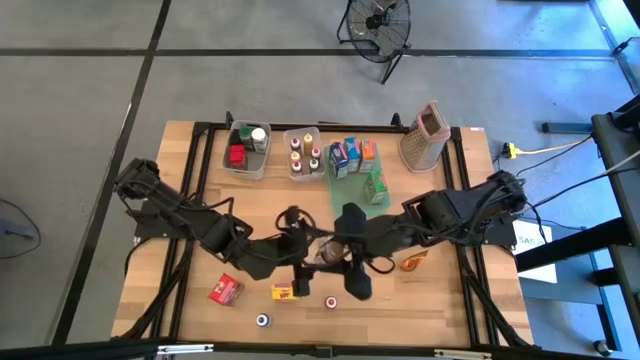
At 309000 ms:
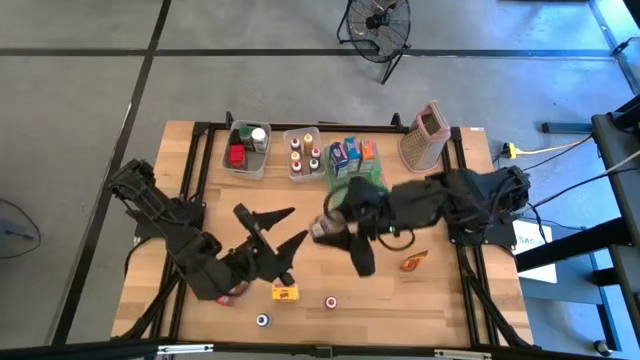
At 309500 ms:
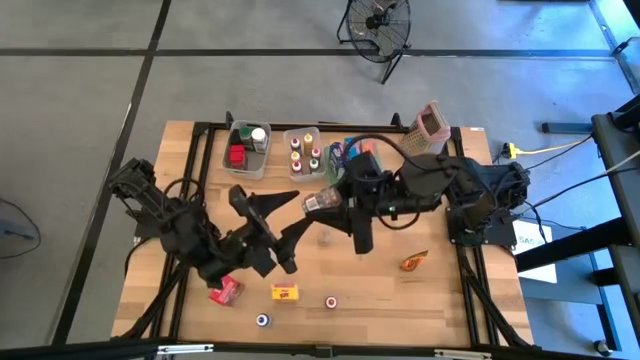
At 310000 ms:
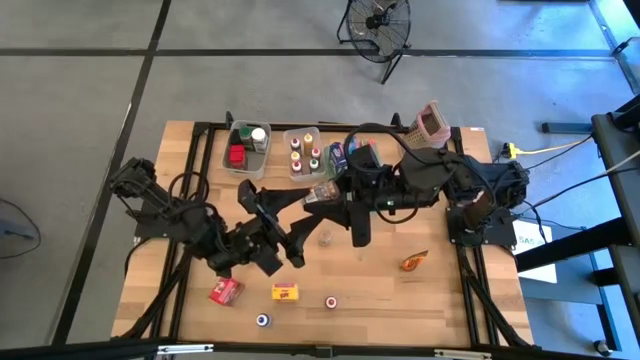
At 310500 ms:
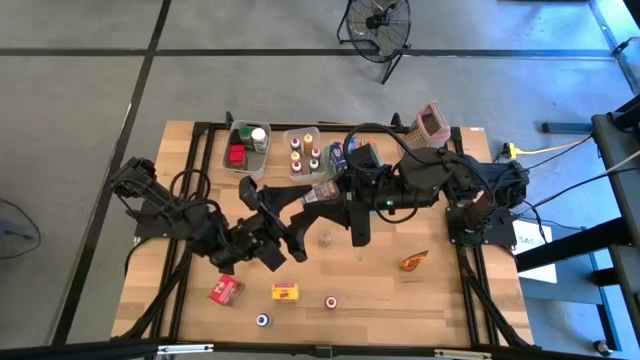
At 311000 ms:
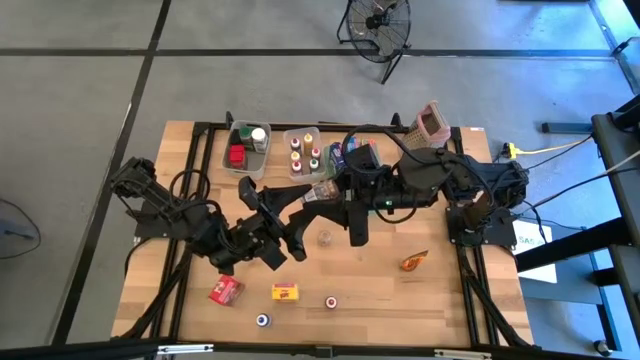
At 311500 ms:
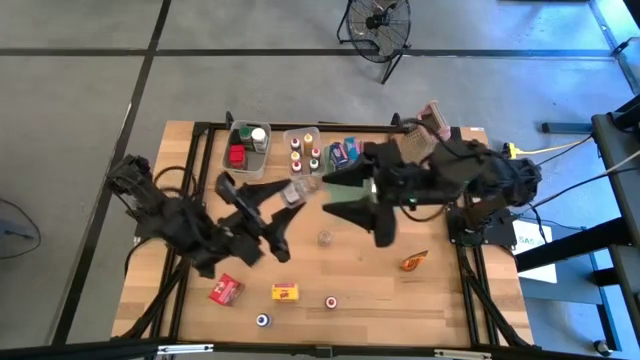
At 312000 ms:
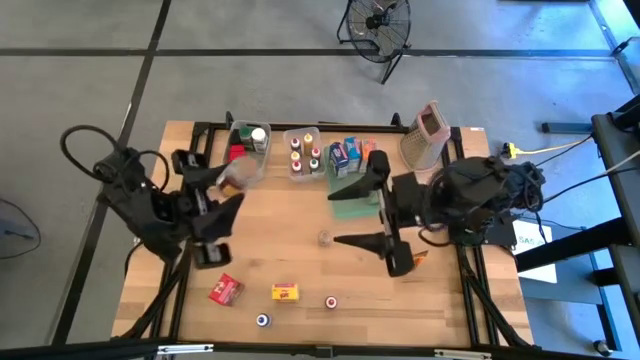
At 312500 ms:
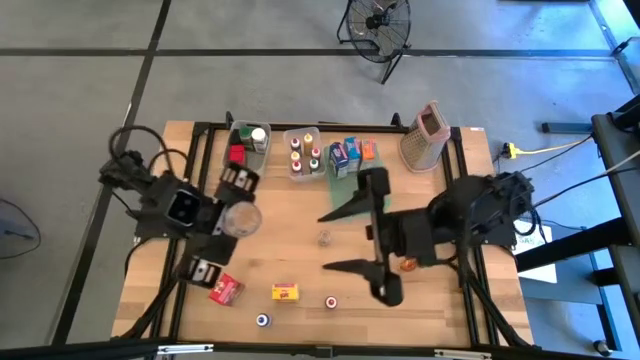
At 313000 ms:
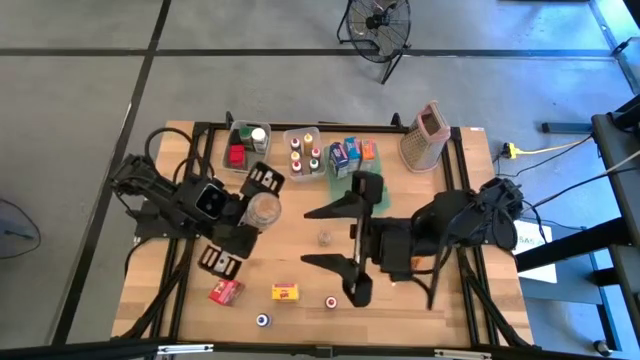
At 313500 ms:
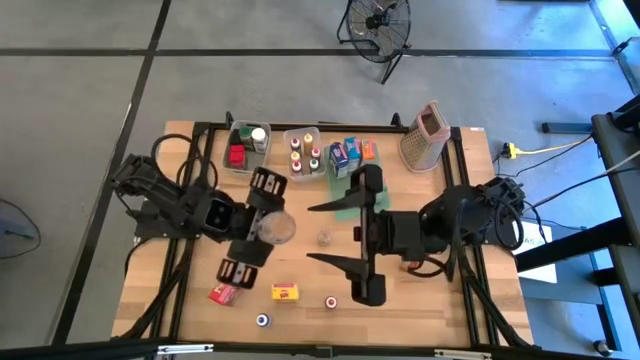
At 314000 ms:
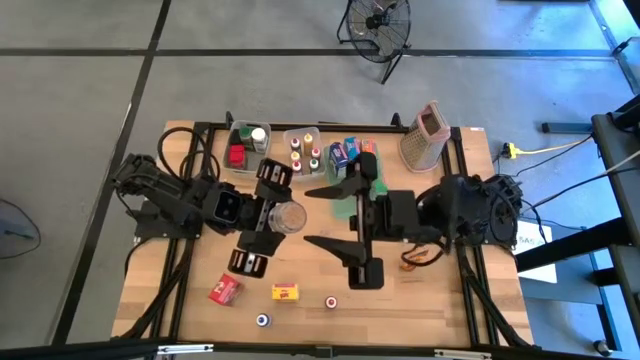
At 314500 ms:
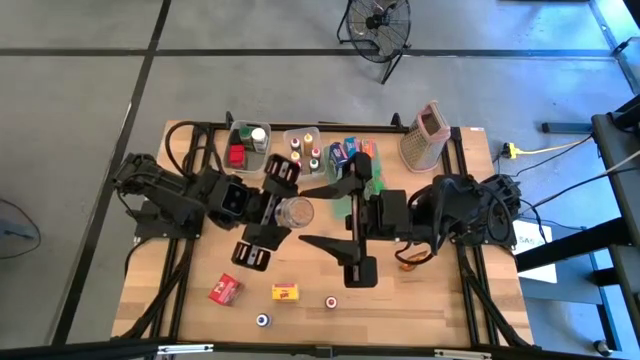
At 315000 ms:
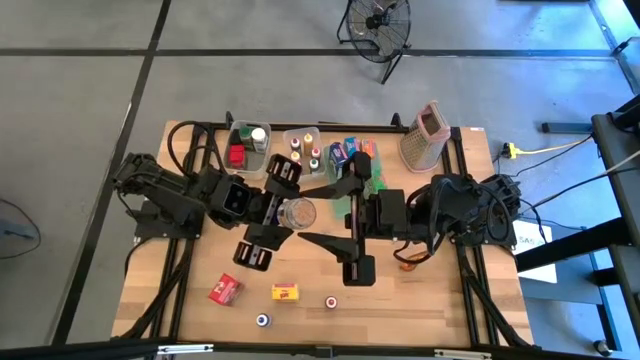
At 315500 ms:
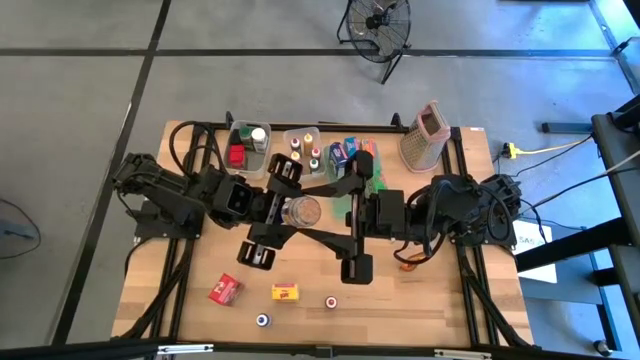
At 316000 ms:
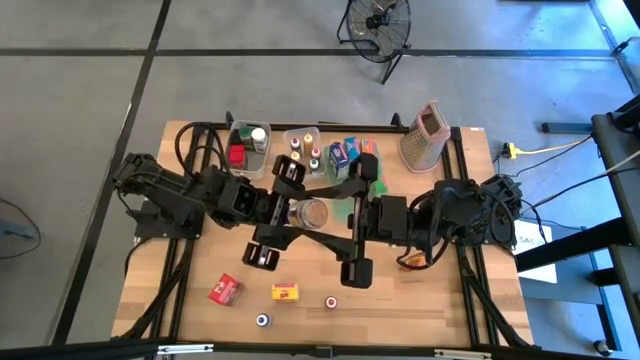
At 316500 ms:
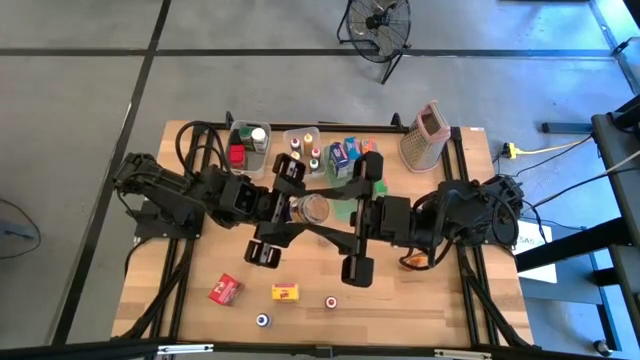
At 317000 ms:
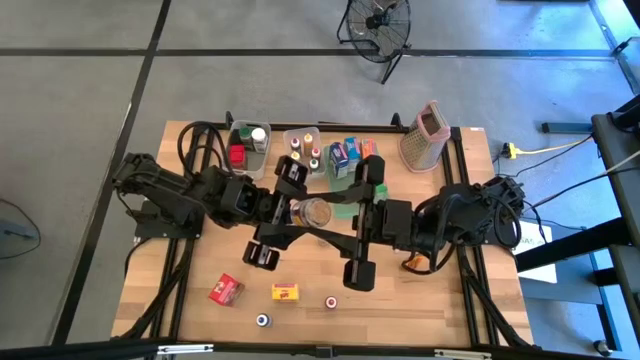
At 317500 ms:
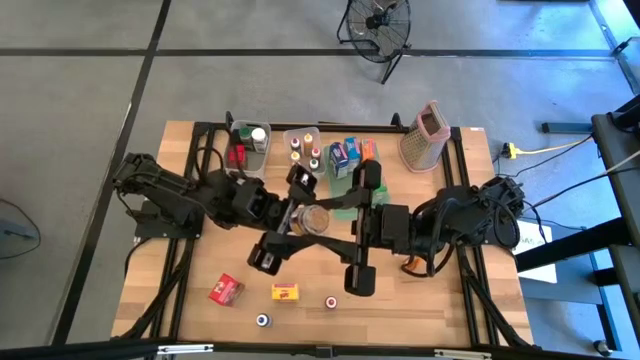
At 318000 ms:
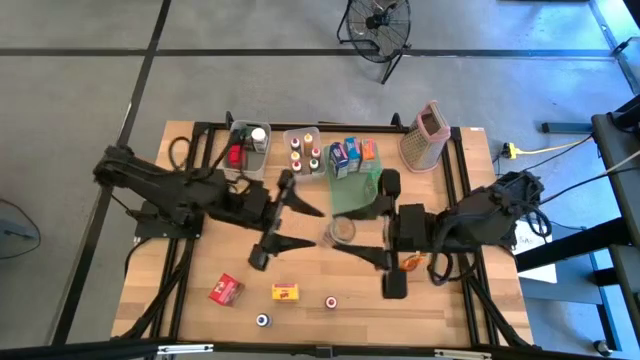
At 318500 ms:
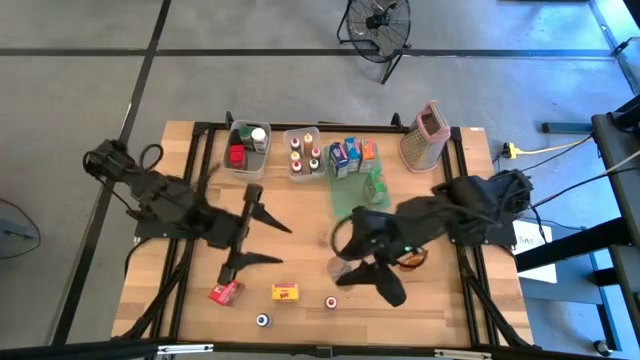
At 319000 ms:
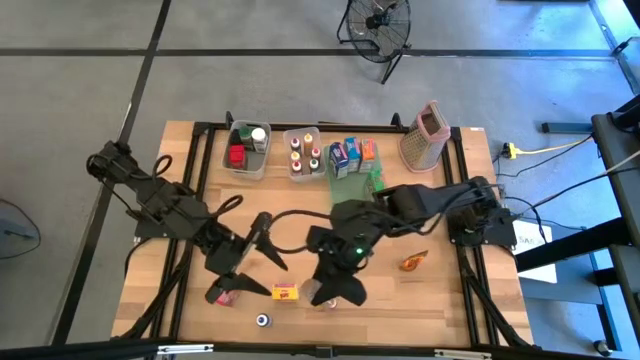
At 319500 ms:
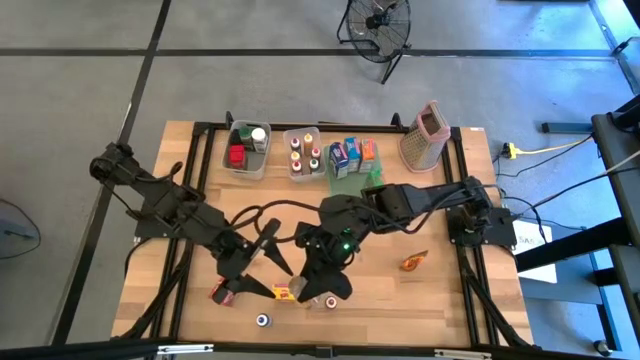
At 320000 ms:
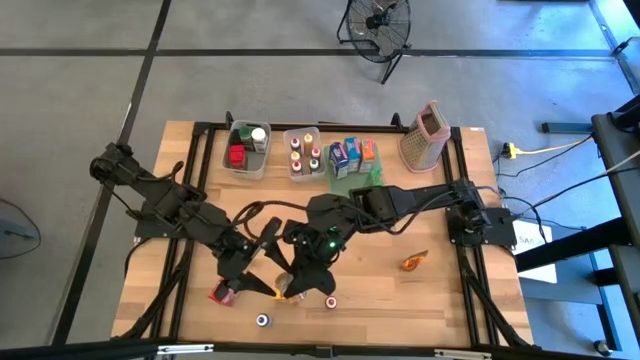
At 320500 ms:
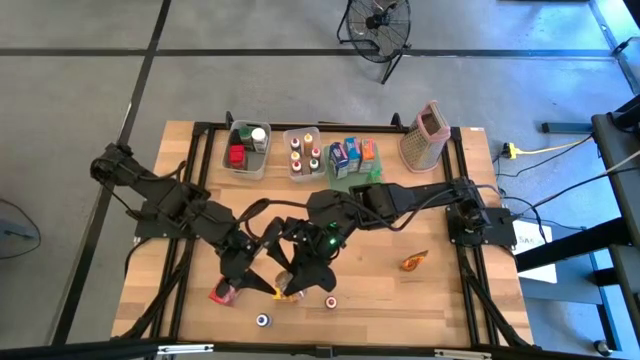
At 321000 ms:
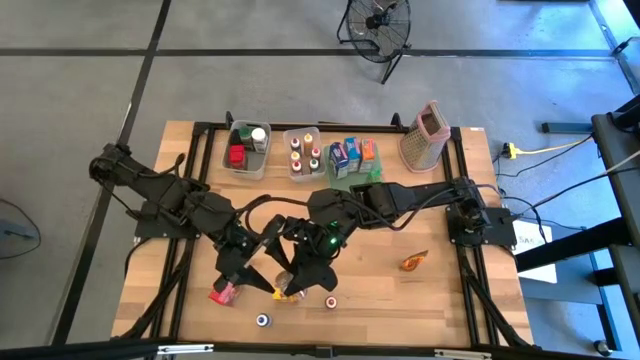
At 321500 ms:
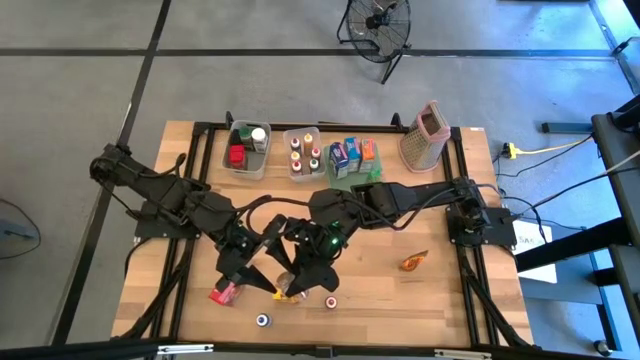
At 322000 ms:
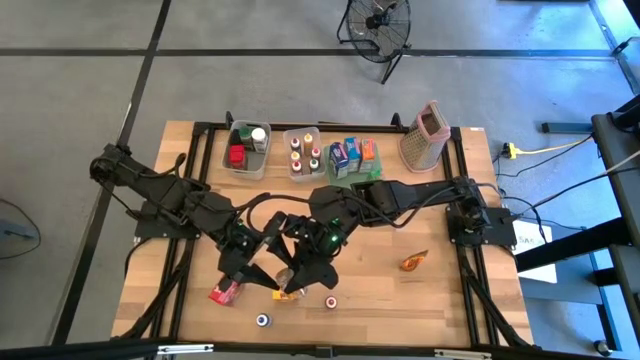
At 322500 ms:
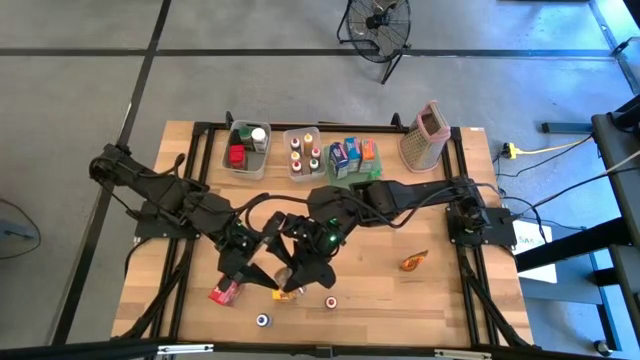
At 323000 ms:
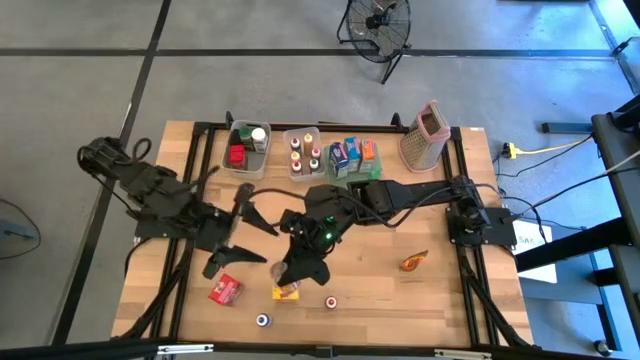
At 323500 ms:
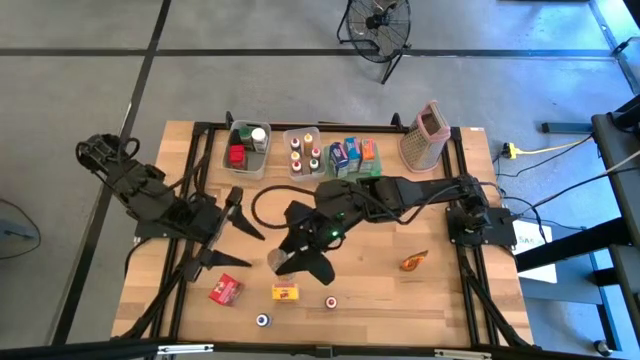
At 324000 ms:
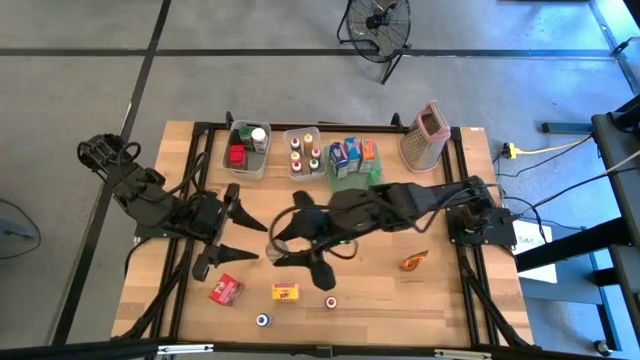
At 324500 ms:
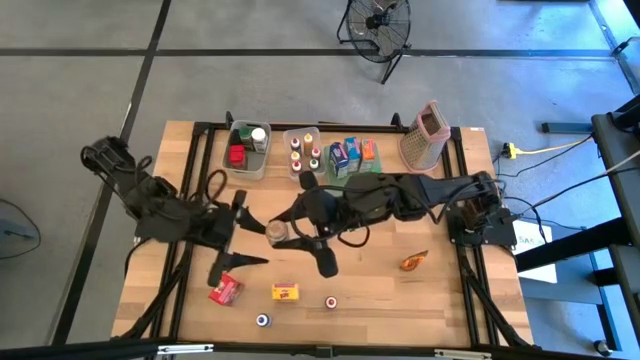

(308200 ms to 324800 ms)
Task: Pick & Place Kitchen Items
Put the bottom transparent spice bottle into the gray bin

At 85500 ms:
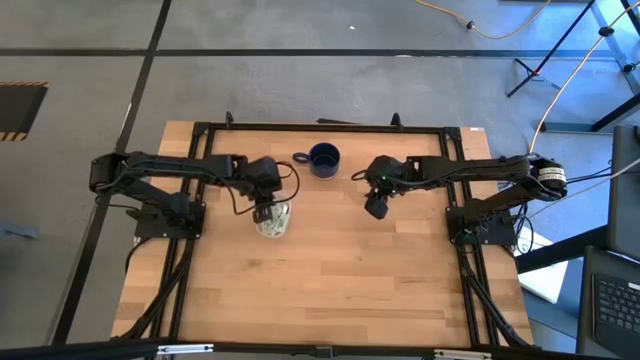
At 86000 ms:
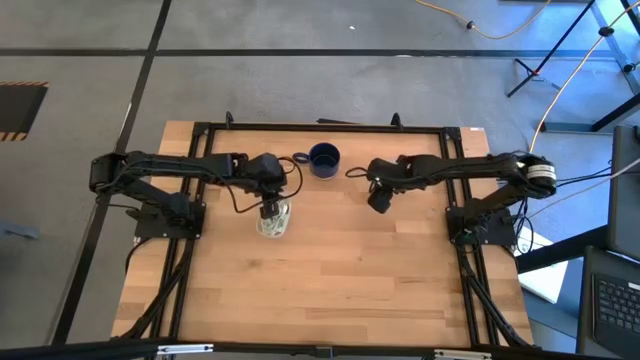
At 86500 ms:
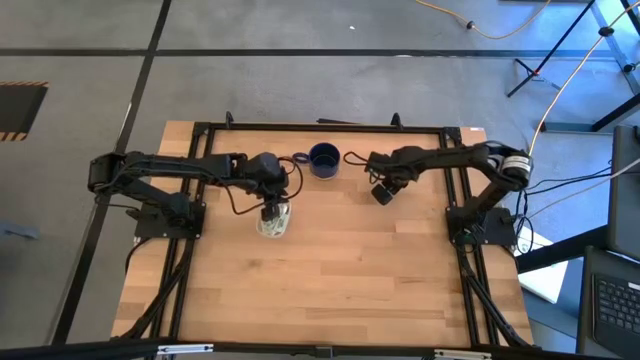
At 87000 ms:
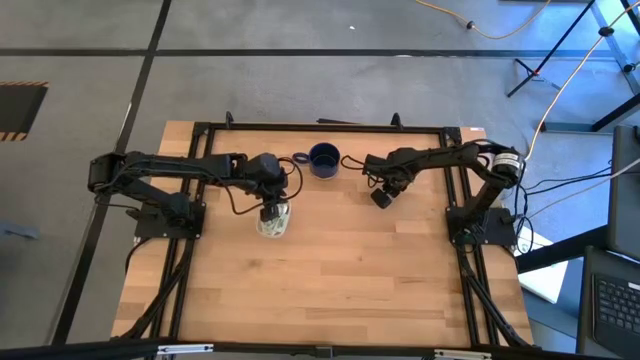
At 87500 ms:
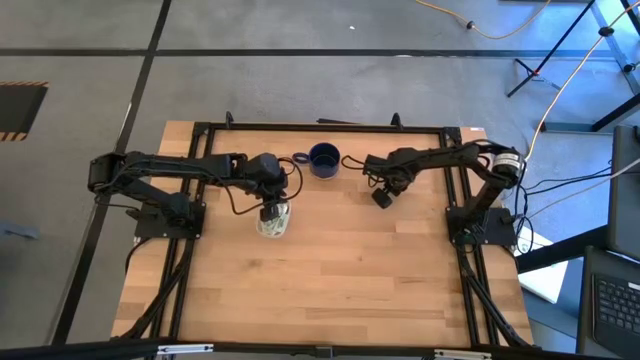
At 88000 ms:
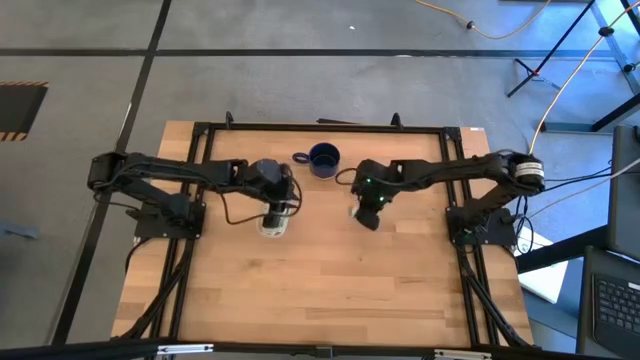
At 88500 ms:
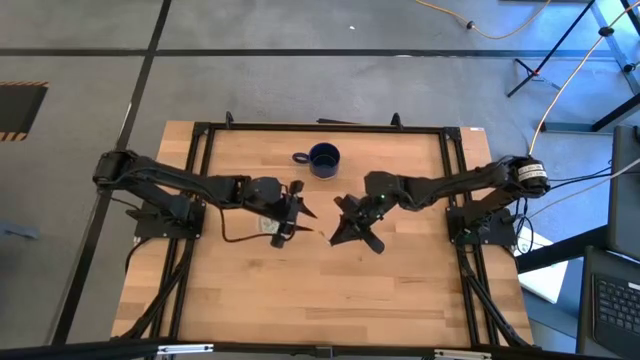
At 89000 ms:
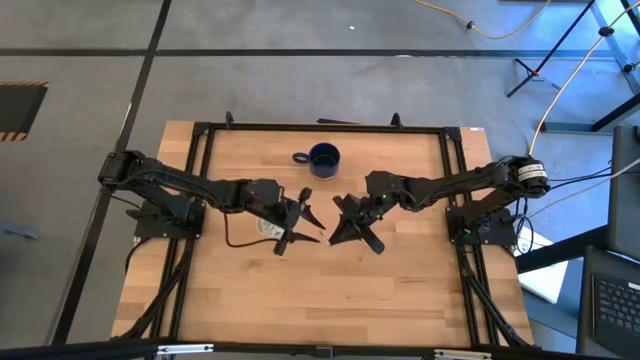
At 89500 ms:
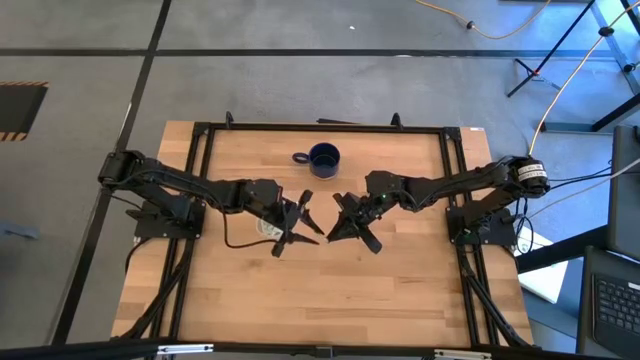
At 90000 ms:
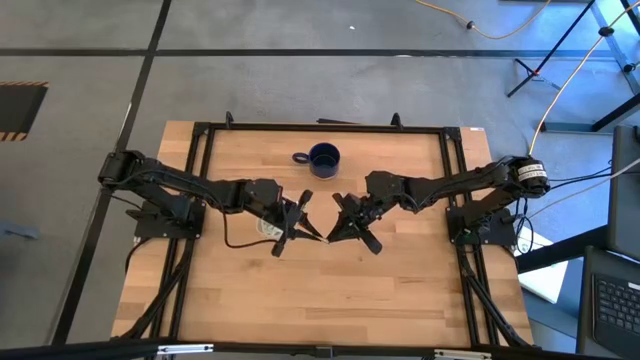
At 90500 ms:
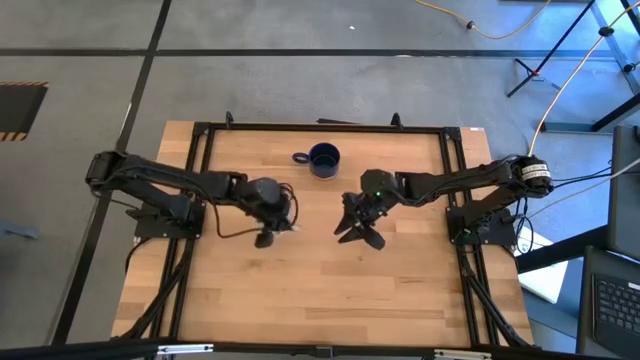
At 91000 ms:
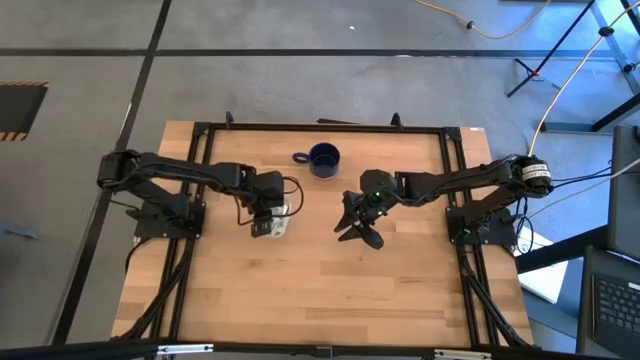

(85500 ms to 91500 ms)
Task: Pick and place Stevia / Truvia into bins
Put the green stevia packet into the transparent container
